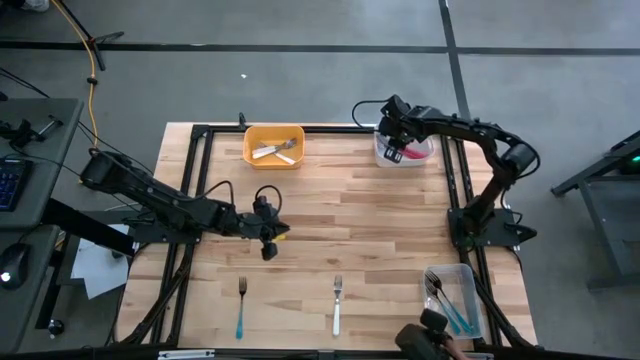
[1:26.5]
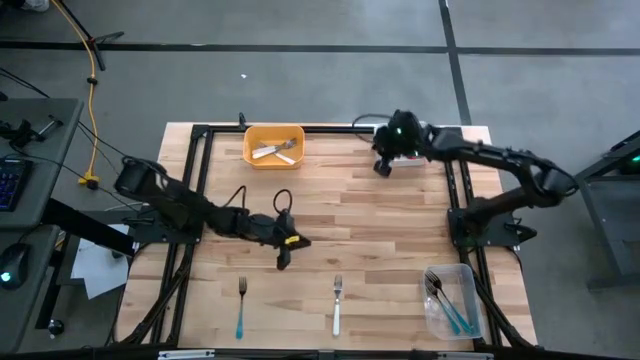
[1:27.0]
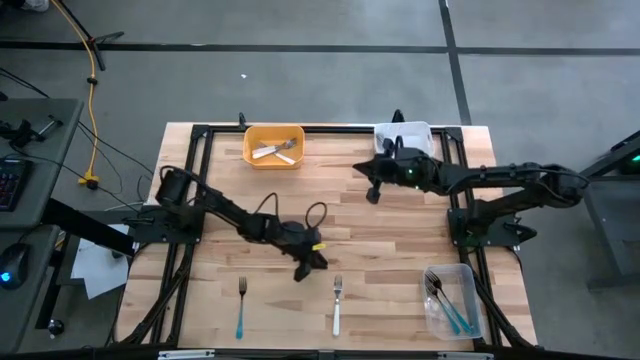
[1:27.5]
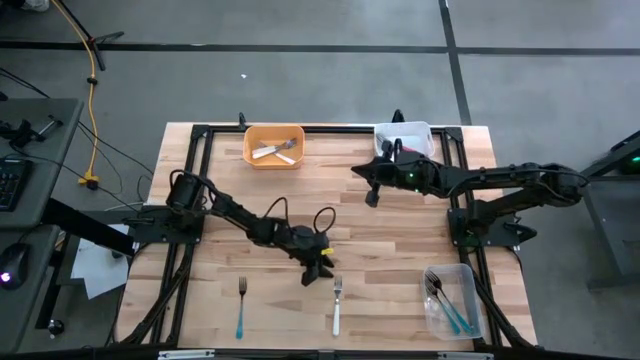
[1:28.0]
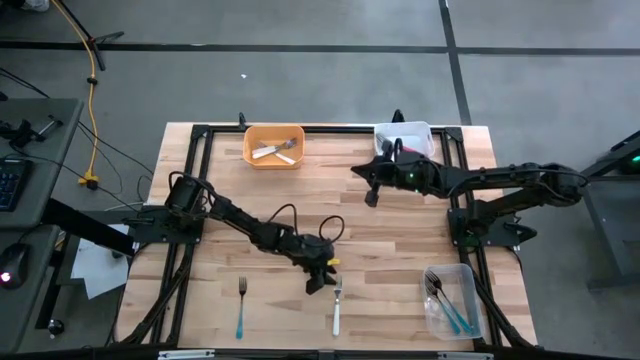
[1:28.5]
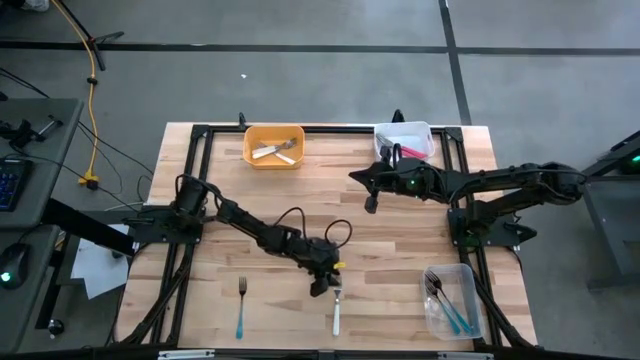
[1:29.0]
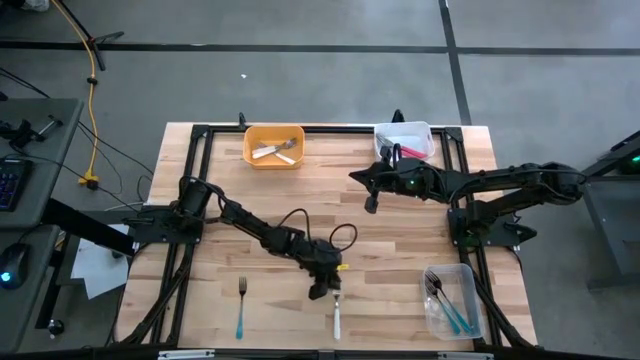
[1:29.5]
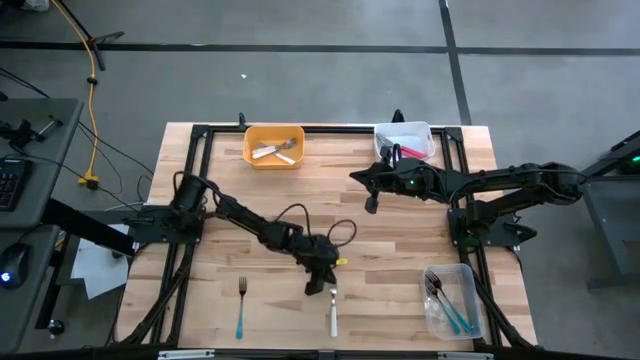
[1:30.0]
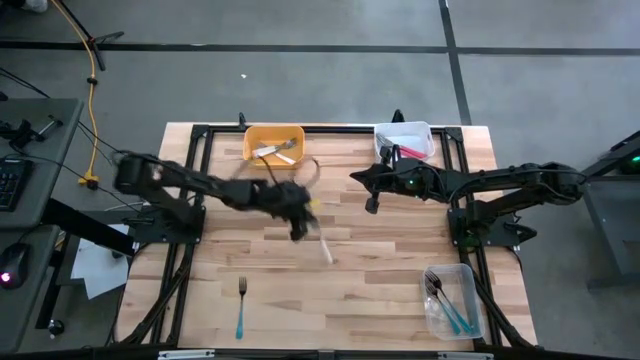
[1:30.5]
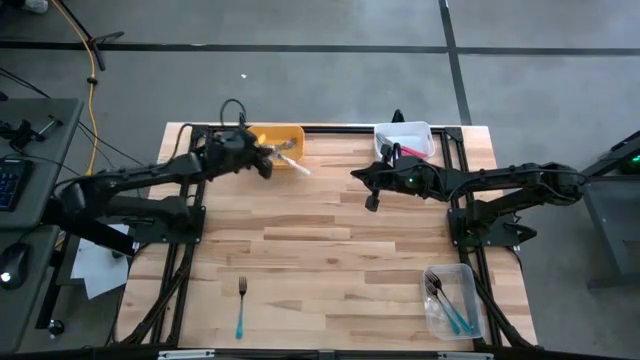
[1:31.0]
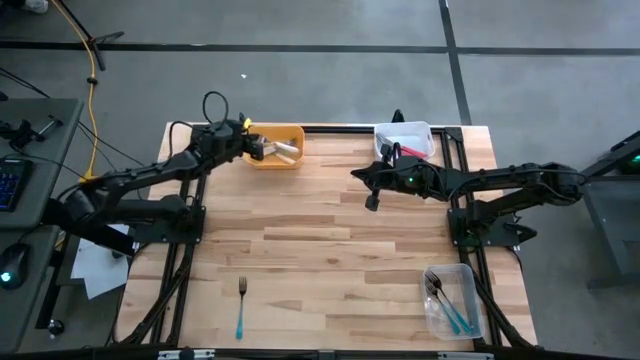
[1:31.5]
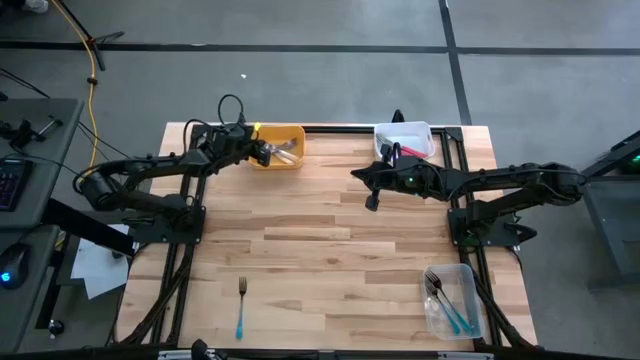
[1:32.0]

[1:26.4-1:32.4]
Task: Sort silverware by color (type)
Put the white fork into the yellow bin

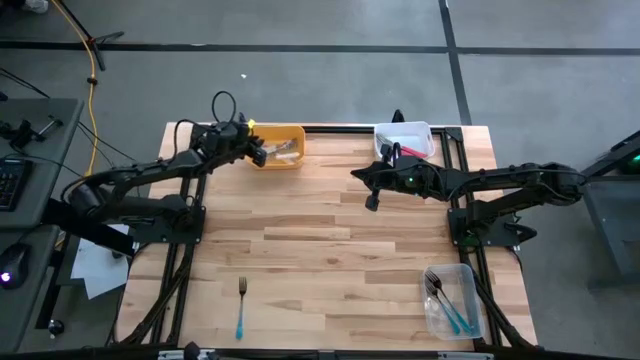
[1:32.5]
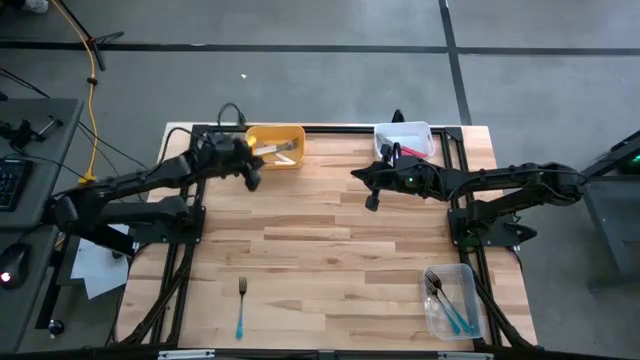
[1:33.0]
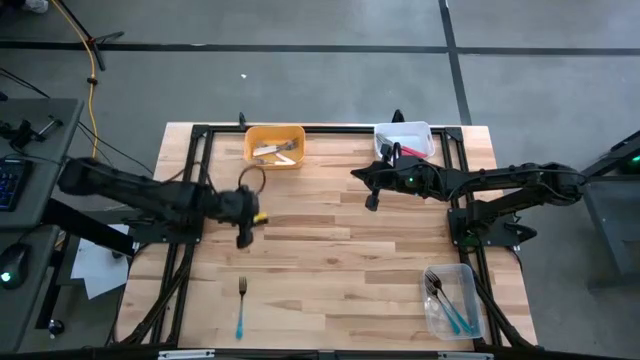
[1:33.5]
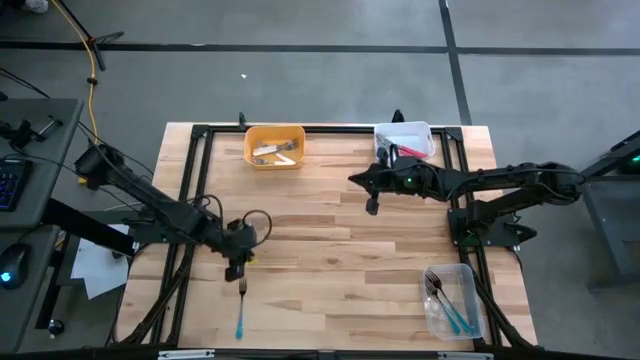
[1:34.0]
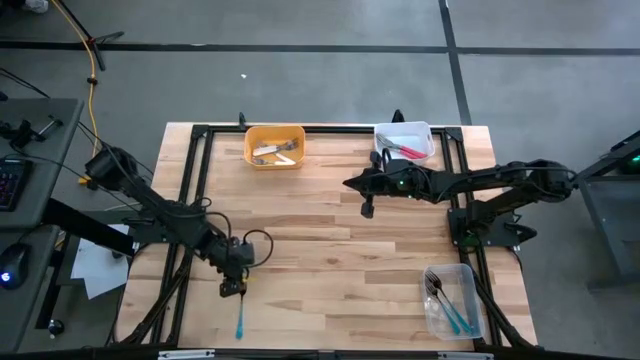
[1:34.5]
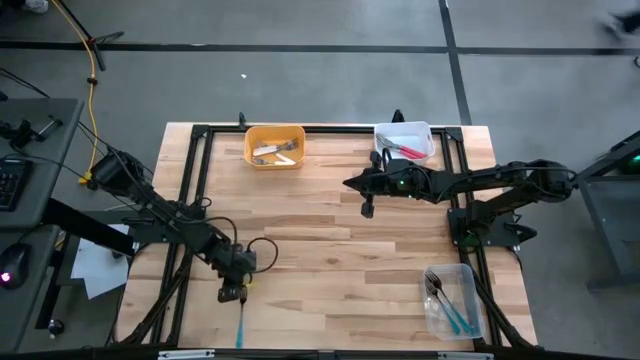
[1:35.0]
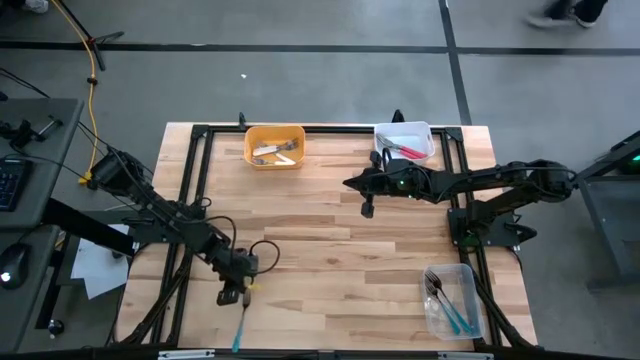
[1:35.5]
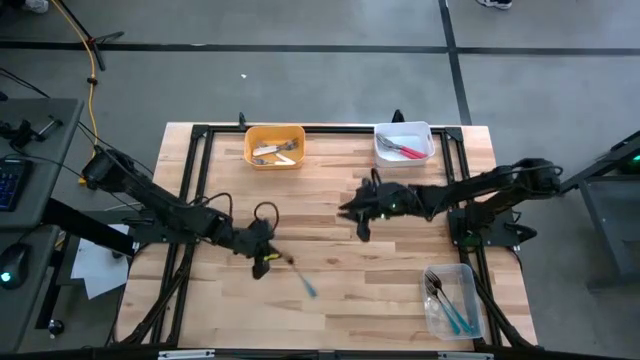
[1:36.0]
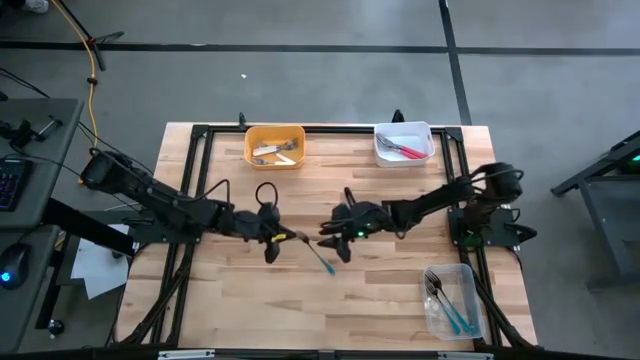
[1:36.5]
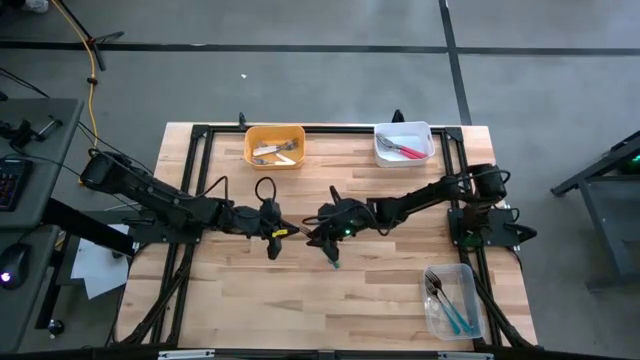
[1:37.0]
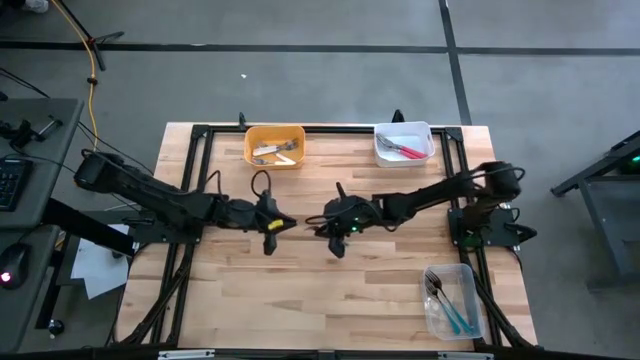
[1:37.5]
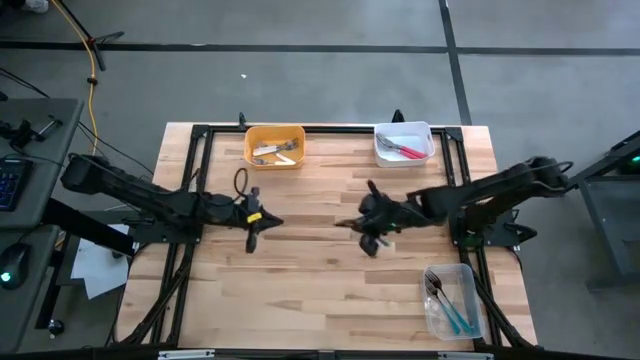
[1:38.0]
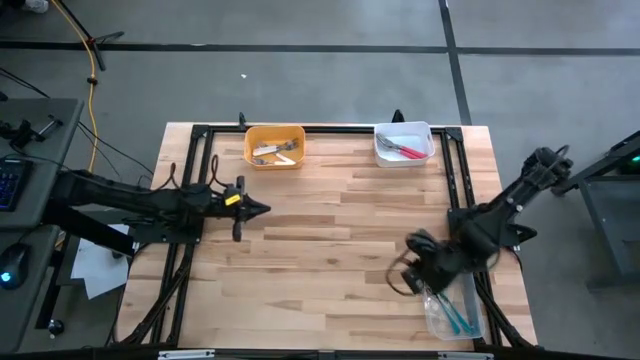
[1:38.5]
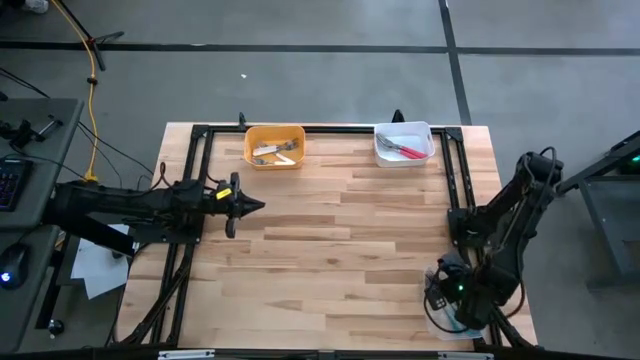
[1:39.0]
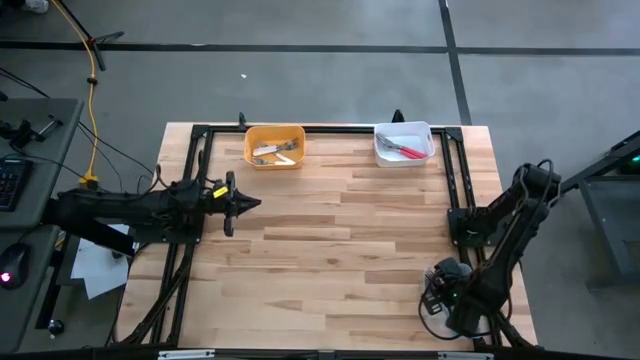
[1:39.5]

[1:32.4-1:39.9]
Put the blue fork into the transparent bin

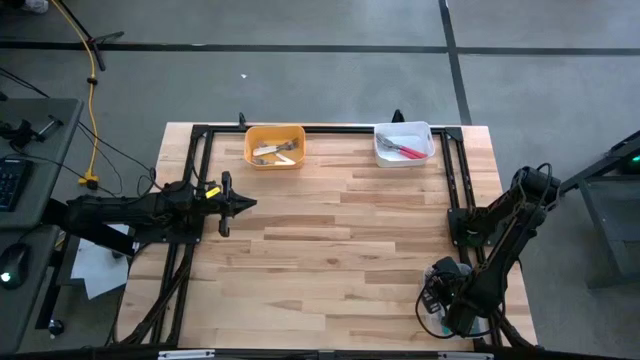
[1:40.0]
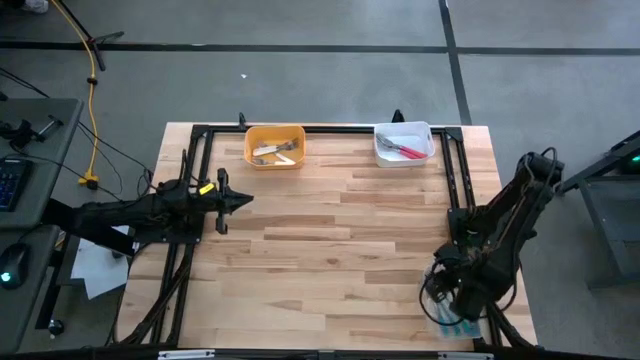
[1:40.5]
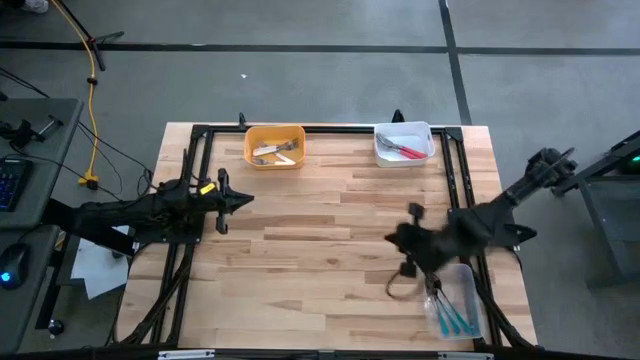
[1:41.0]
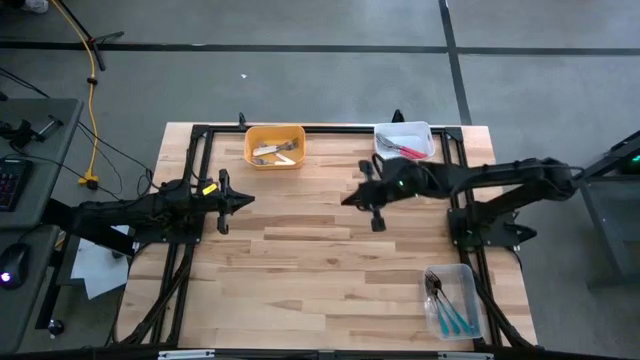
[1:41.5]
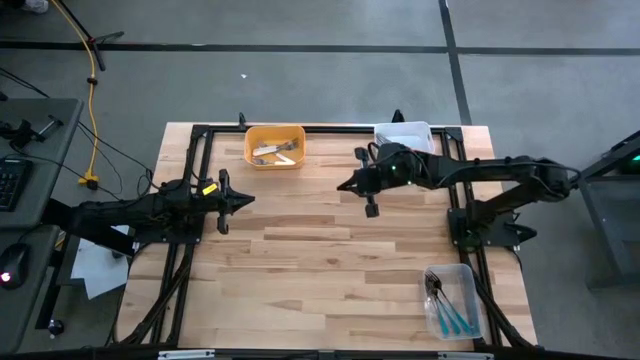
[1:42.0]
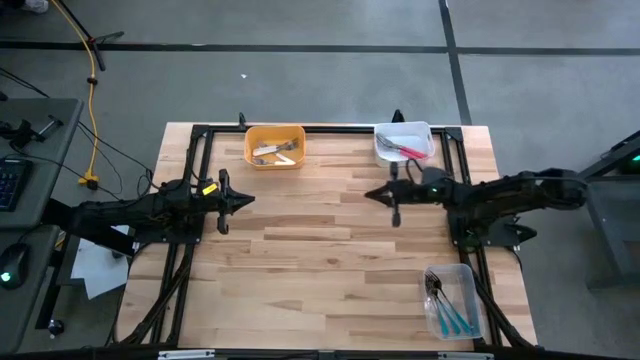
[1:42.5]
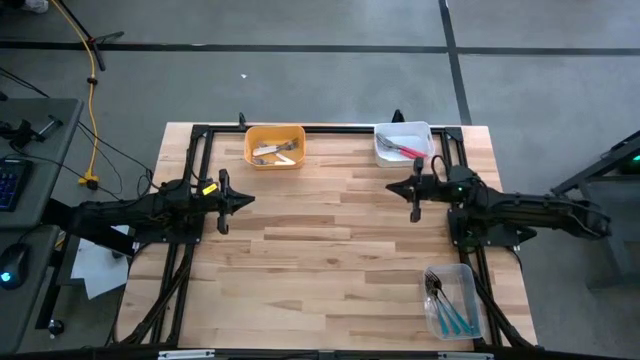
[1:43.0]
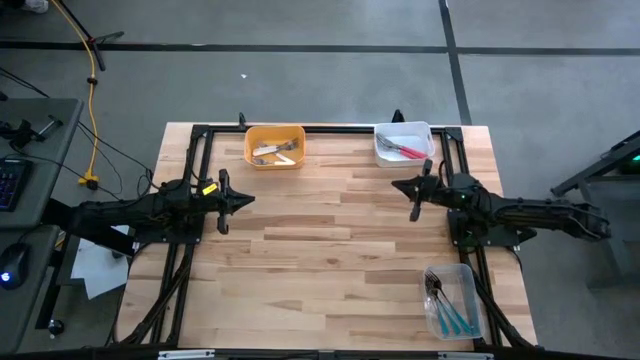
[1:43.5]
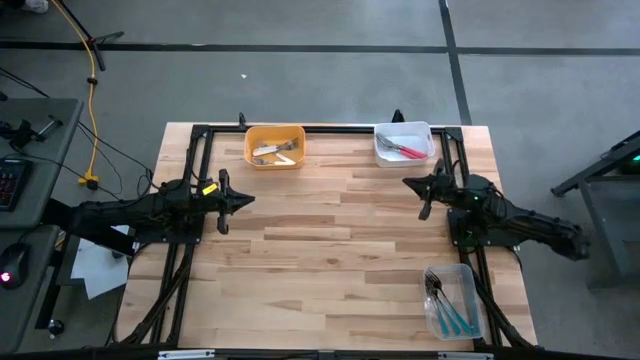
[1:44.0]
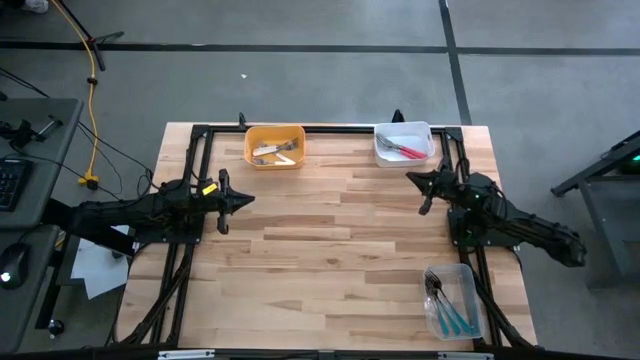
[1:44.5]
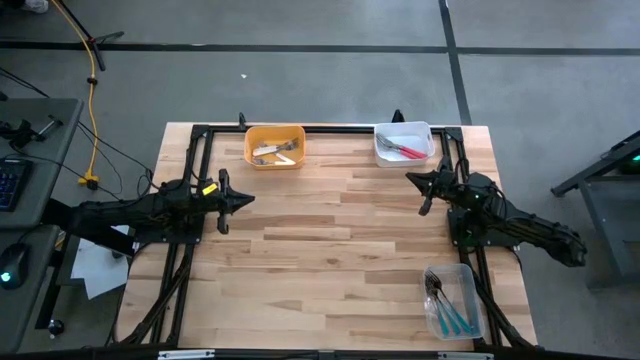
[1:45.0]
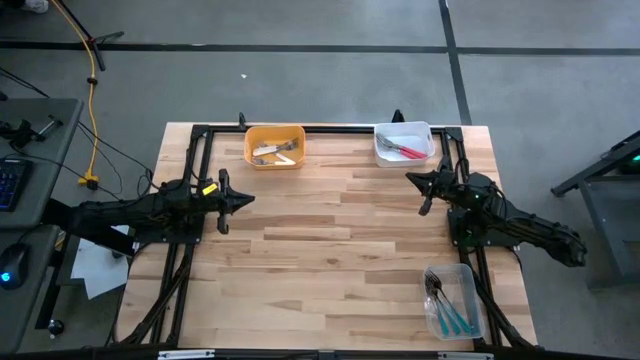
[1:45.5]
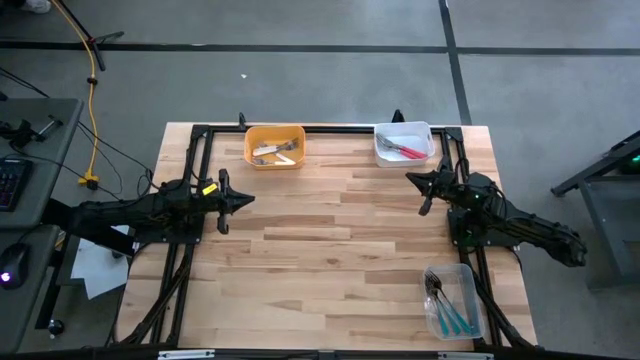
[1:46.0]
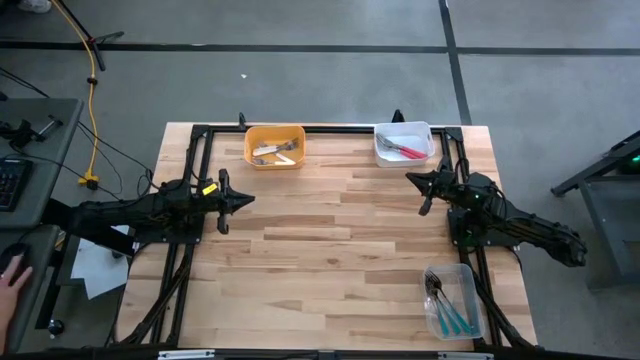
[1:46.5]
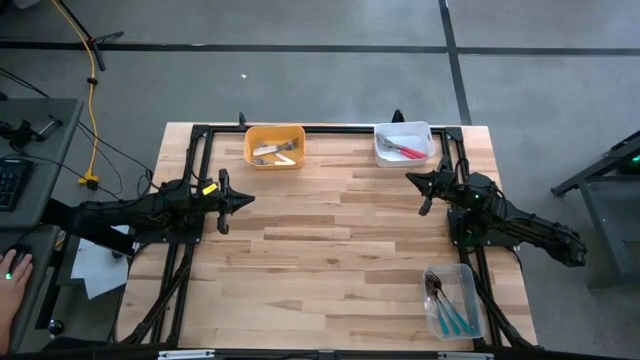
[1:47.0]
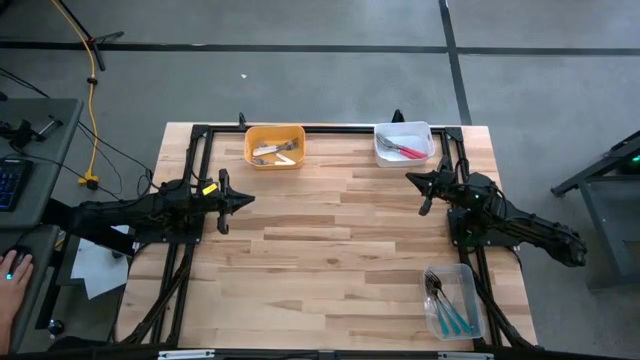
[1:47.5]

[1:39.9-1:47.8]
Return to Home Position
